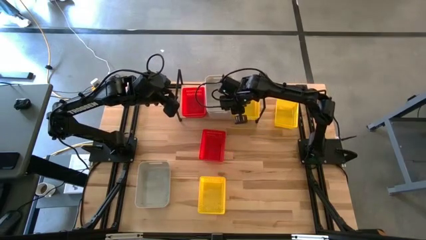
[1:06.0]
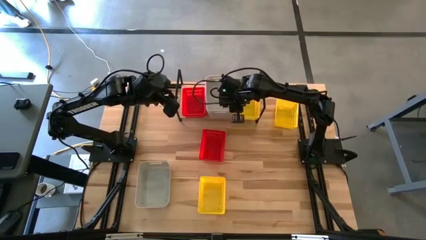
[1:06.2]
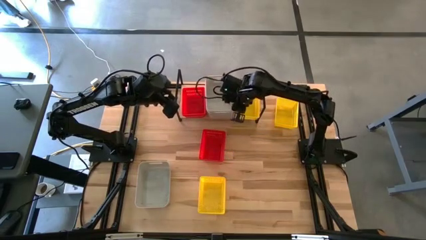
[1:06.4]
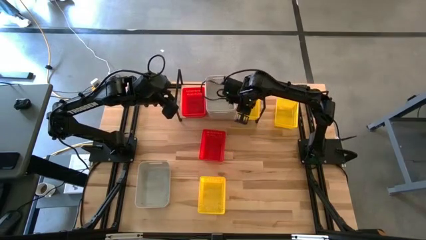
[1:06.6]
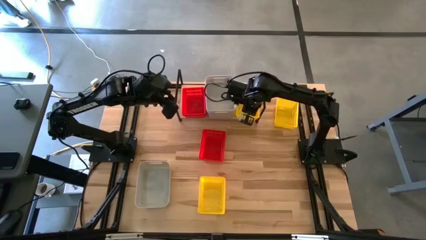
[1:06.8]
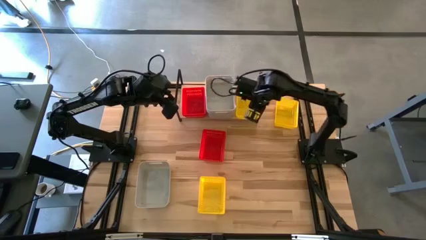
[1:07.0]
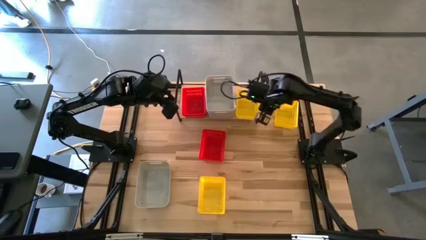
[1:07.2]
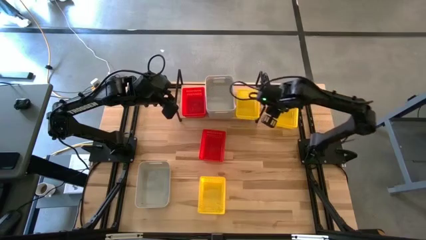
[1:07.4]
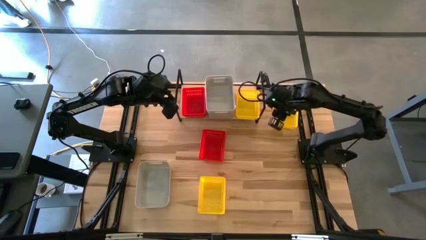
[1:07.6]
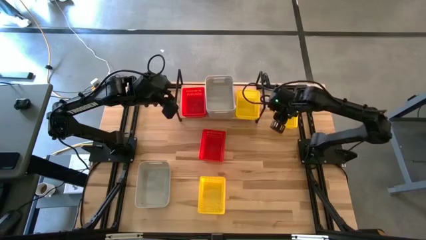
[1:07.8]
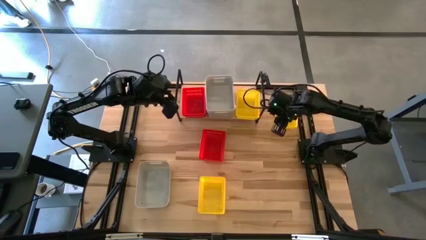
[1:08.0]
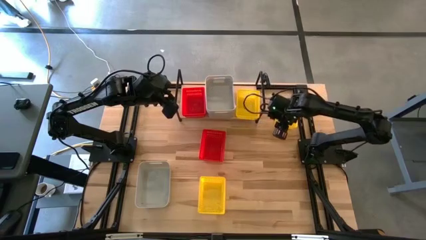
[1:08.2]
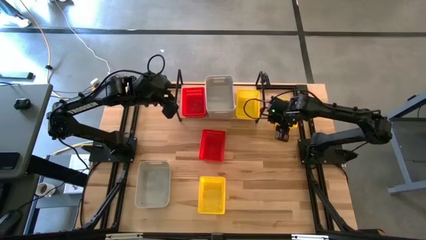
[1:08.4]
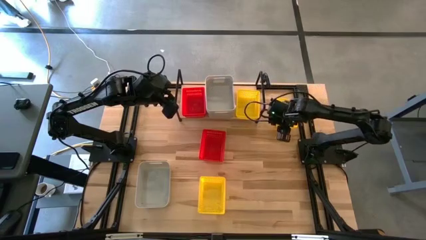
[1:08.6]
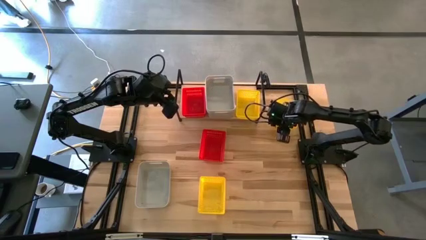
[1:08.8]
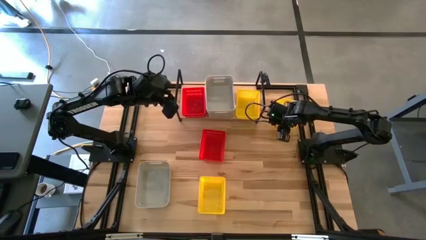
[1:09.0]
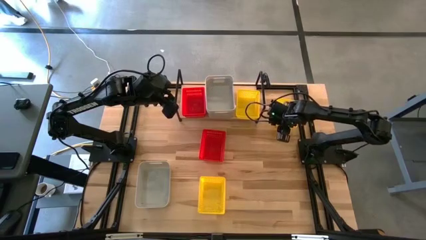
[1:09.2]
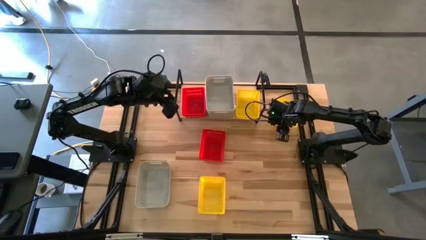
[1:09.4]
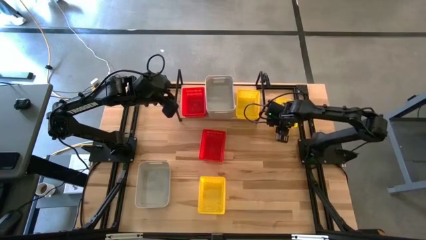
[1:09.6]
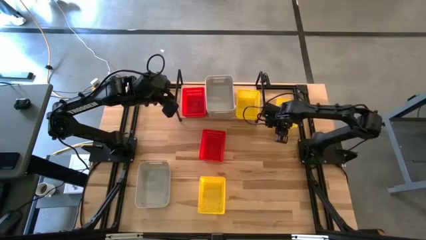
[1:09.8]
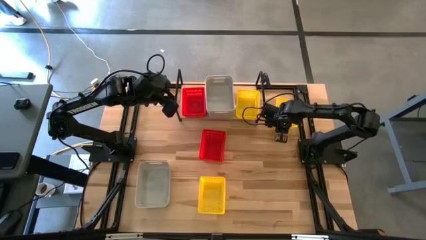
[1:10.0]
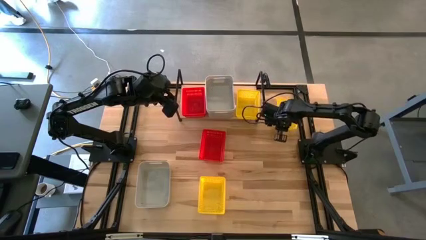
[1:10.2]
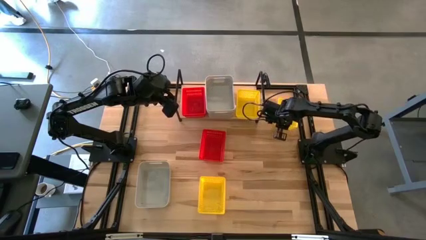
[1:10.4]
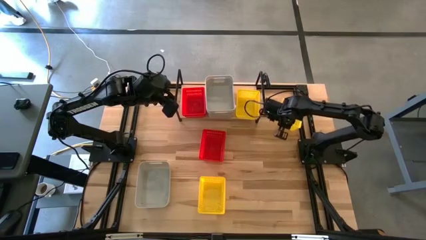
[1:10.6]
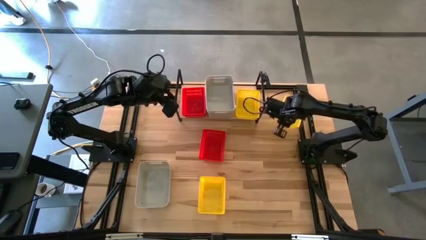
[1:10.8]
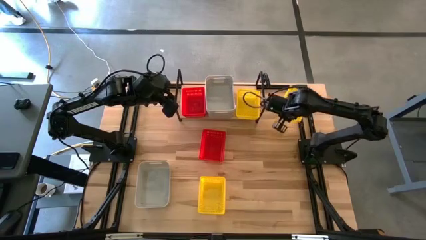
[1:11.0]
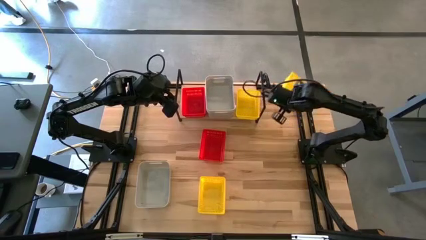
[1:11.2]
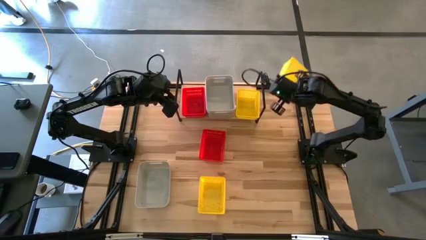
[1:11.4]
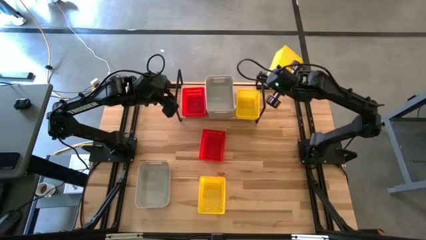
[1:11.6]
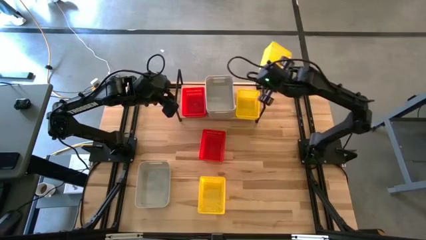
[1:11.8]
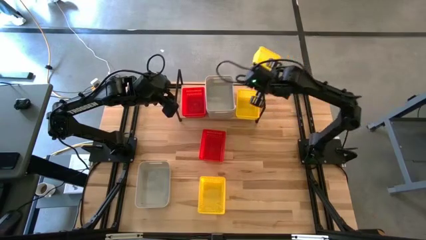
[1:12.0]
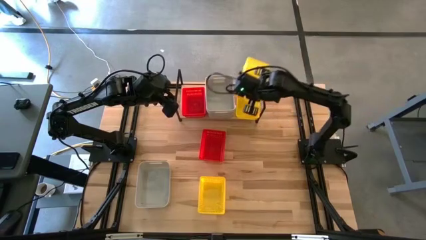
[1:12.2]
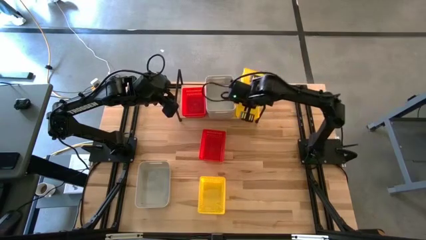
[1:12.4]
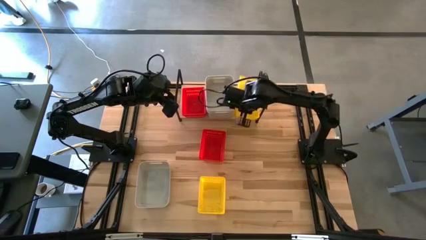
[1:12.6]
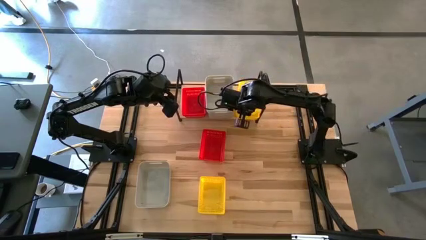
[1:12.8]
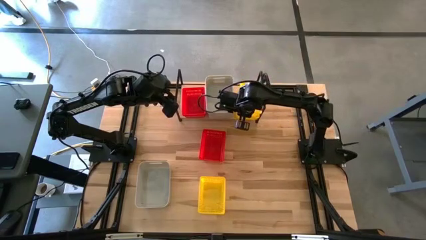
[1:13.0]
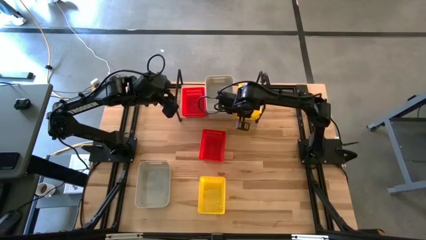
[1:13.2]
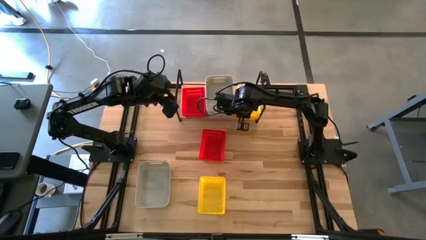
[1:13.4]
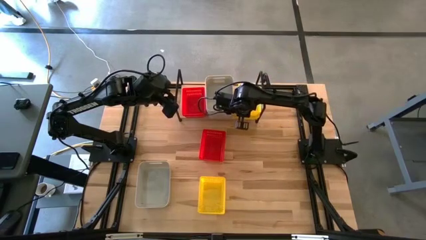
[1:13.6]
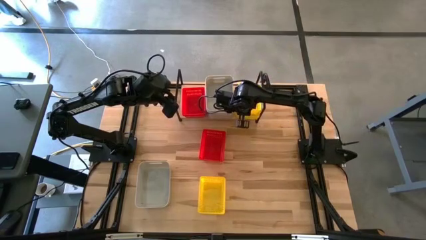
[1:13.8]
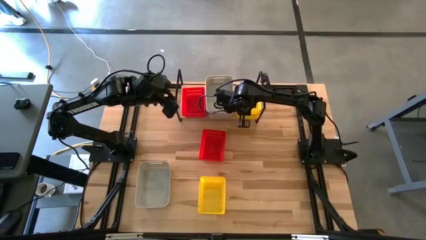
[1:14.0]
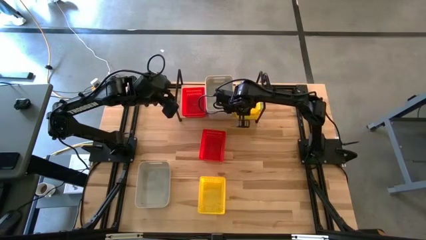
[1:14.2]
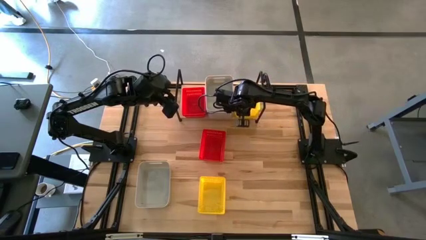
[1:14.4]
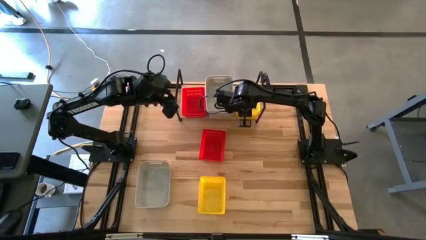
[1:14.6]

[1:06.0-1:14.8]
Task: Stack baskets on shelf by color
Stack the top yellow bin on the top of the other yellow bin on the shelf

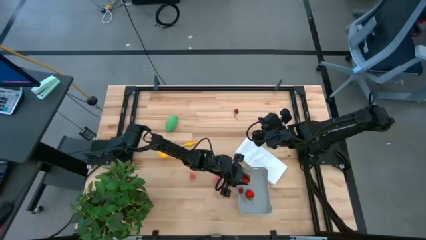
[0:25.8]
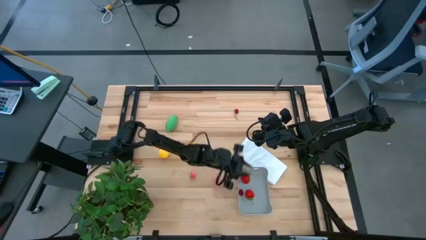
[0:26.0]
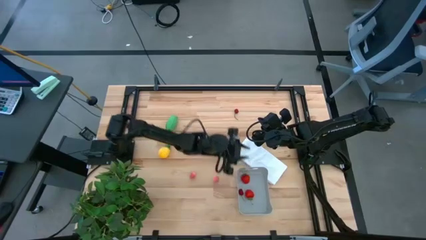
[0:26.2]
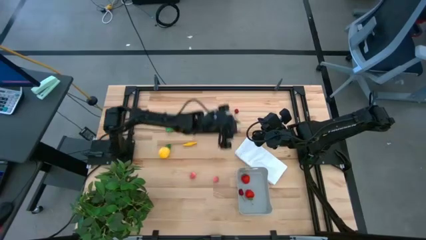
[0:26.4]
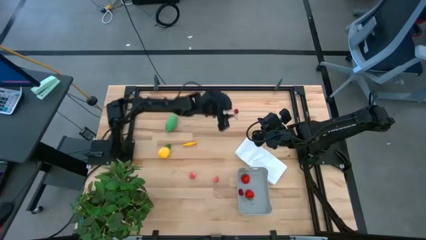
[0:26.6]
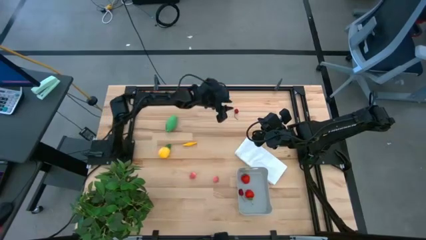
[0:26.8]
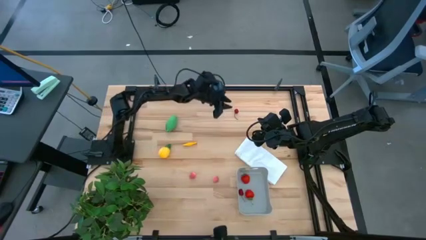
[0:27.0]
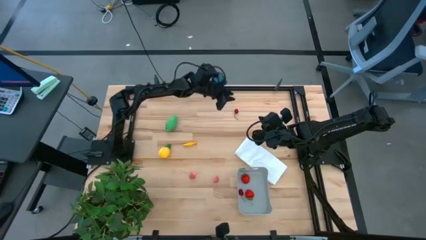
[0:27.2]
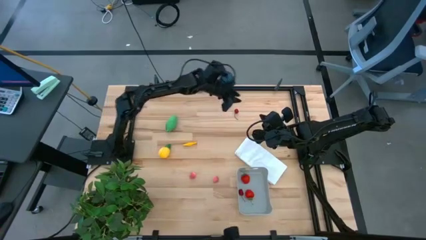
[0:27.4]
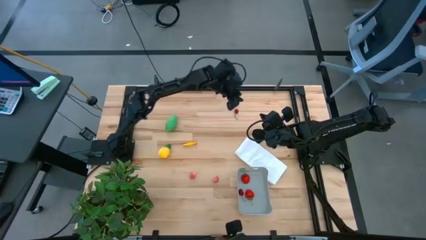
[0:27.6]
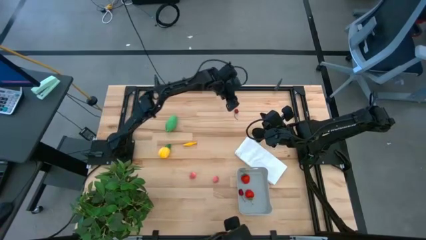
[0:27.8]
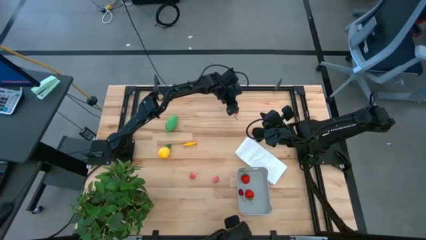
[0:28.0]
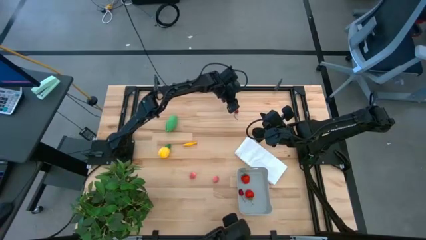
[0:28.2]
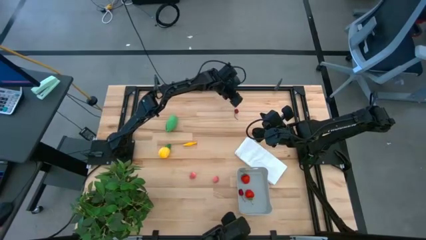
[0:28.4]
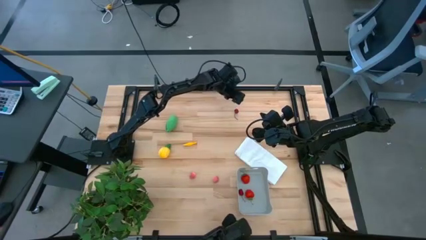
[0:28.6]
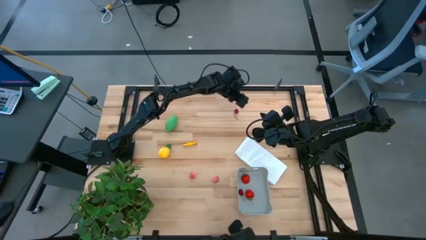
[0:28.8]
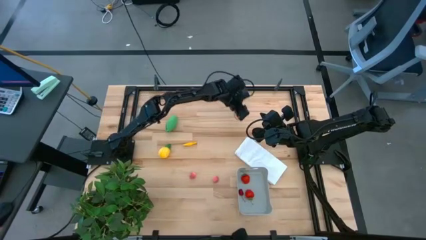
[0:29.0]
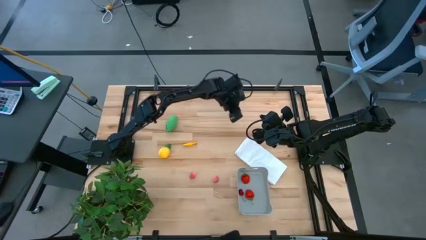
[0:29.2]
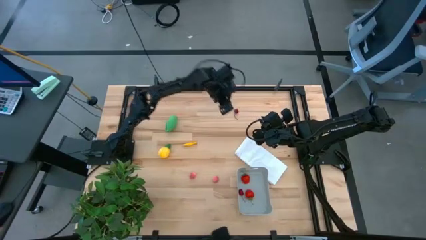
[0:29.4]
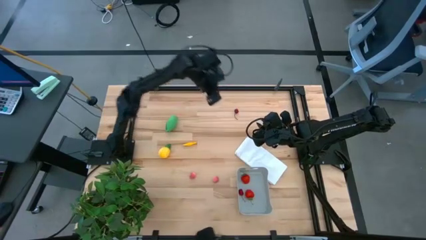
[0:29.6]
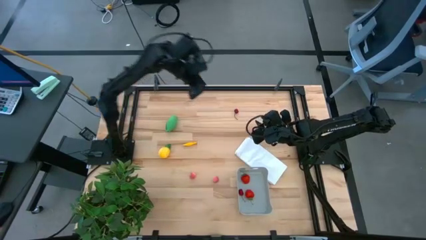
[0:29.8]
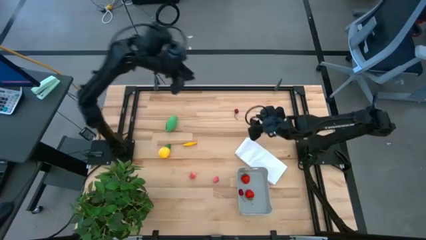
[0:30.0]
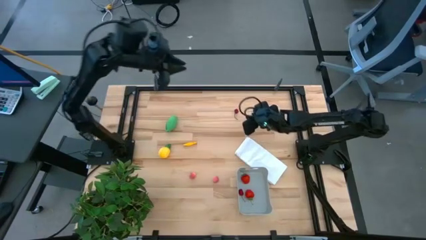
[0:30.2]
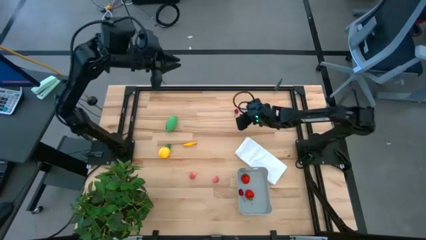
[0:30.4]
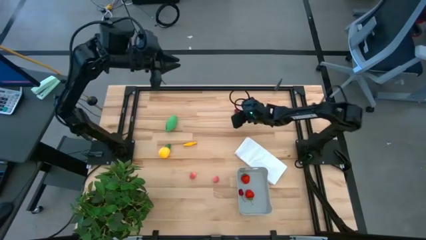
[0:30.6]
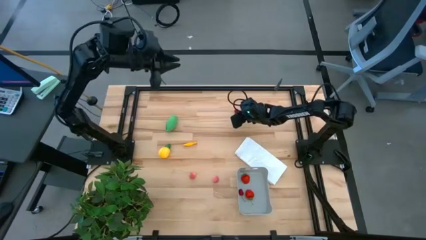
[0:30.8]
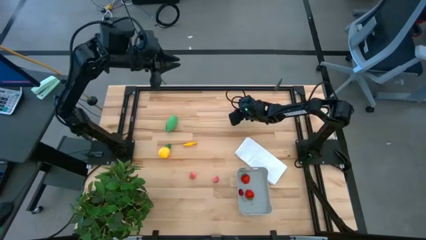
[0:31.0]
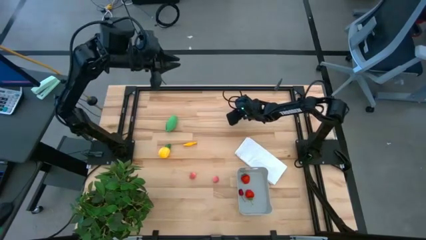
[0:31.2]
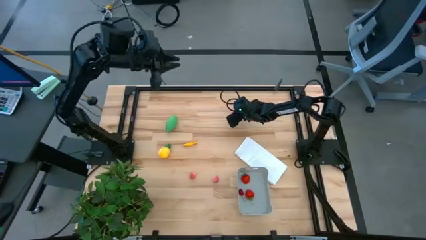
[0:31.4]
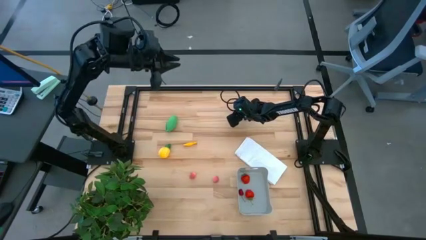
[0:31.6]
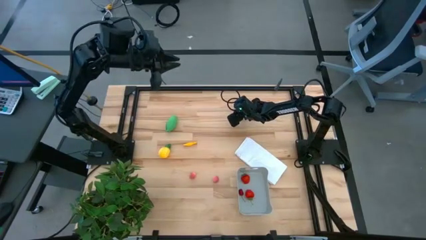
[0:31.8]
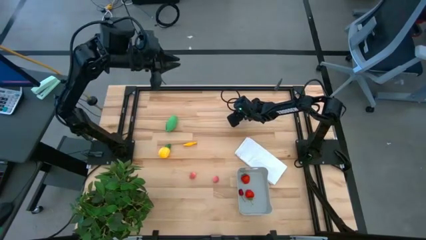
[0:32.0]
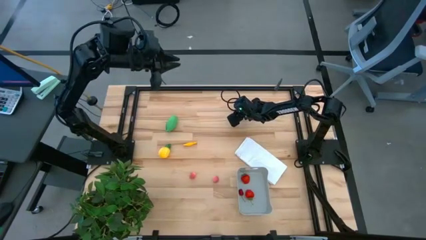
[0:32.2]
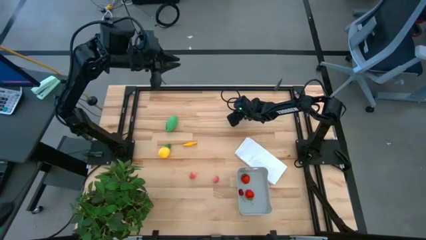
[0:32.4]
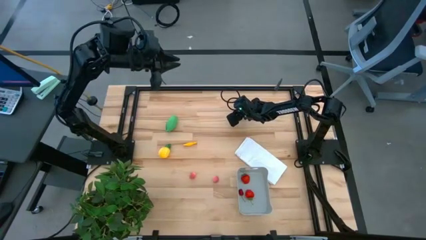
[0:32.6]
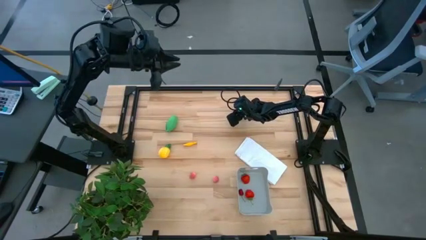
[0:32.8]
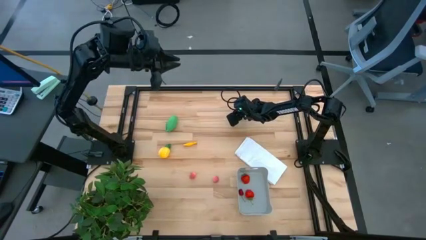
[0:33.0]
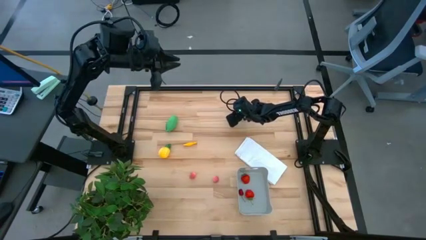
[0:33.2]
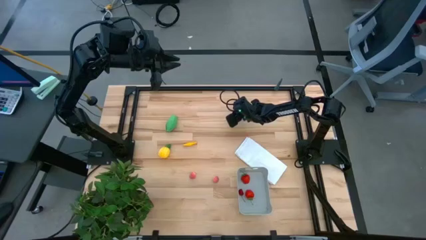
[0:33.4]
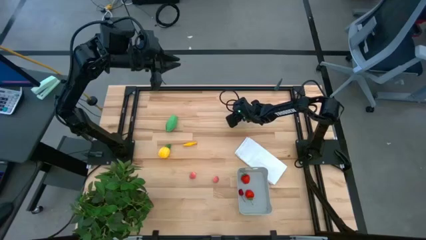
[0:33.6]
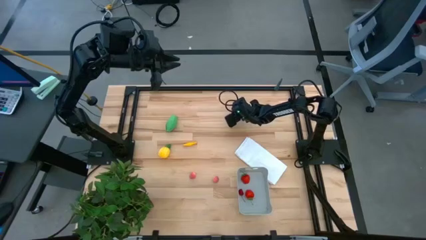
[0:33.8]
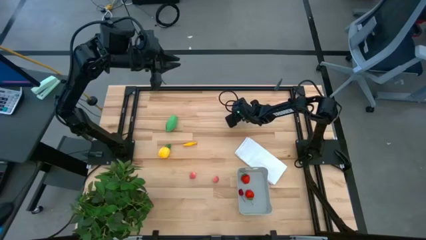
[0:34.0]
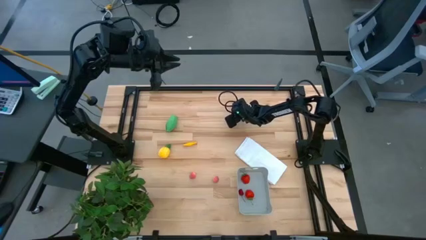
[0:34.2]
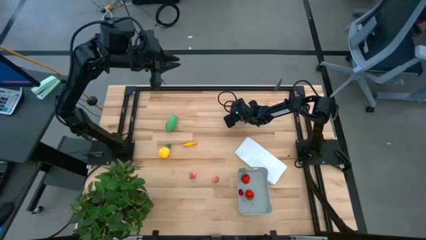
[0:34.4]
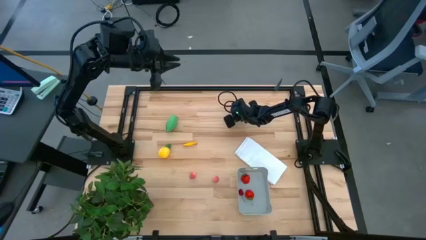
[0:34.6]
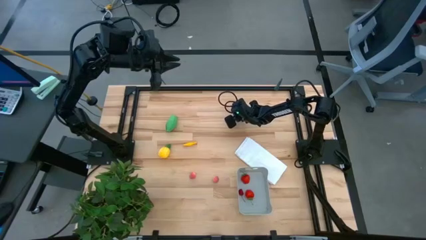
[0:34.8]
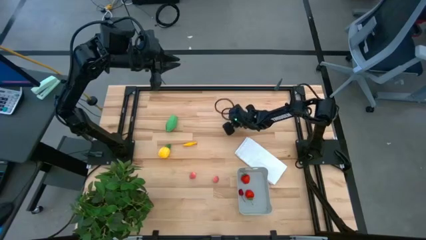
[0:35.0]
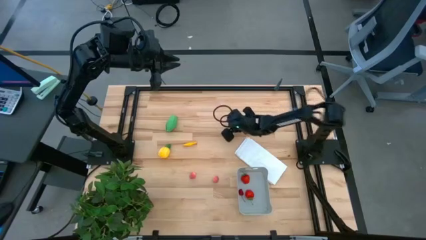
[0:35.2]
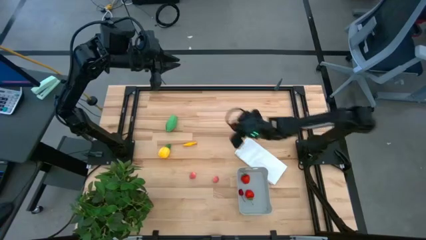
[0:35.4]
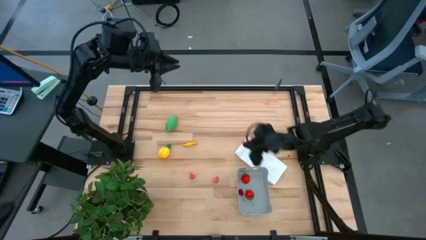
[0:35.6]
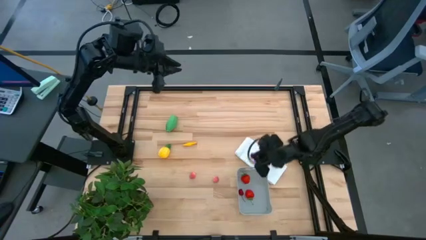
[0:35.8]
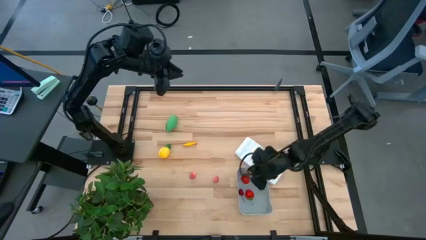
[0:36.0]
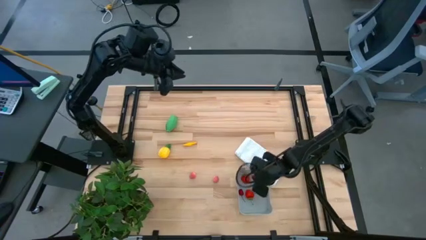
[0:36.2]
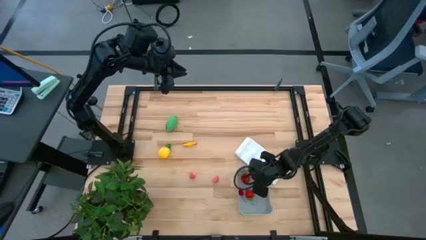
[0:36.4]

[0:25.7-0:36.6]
Task: Pick and placing Produce into tupperware
Put the red cherry into the gray bin
